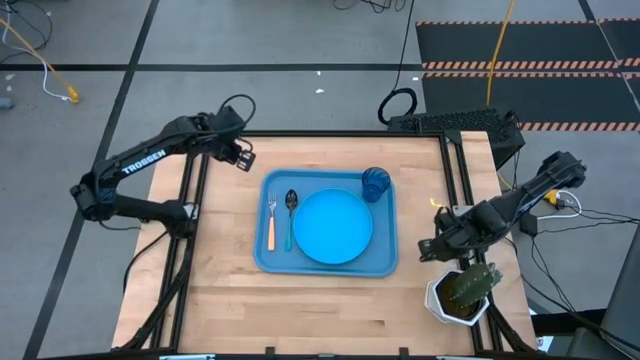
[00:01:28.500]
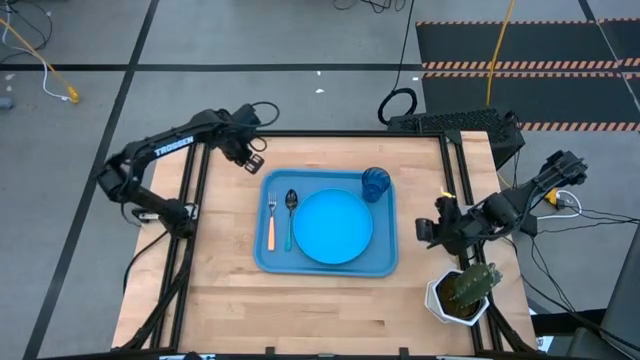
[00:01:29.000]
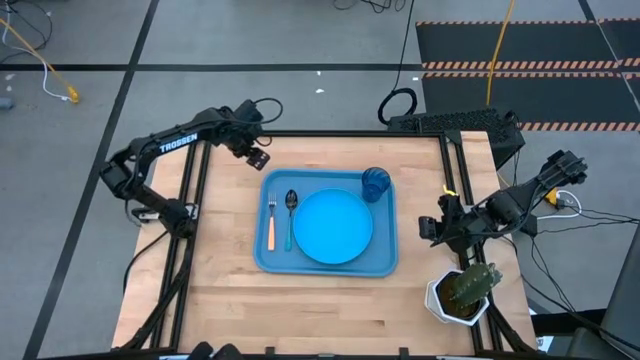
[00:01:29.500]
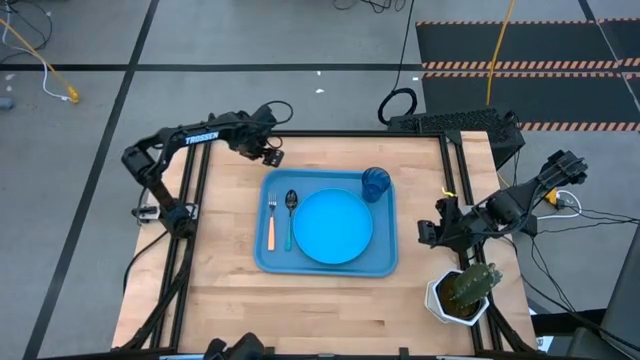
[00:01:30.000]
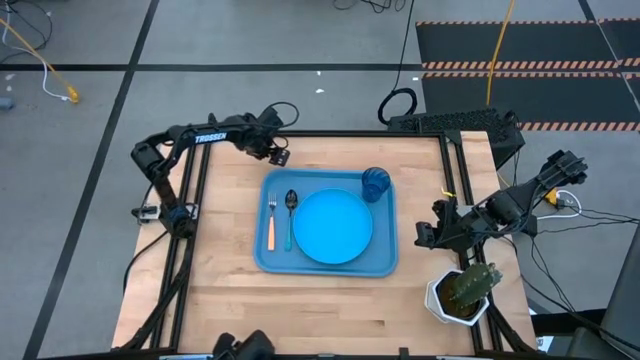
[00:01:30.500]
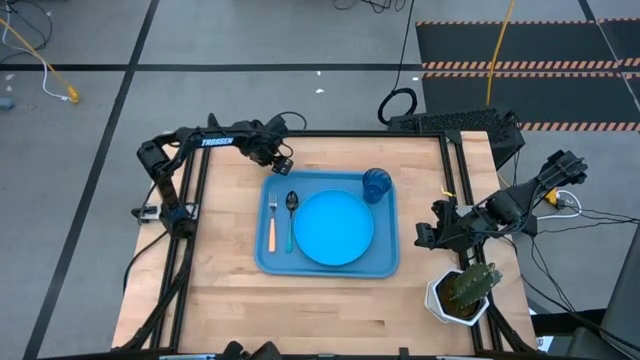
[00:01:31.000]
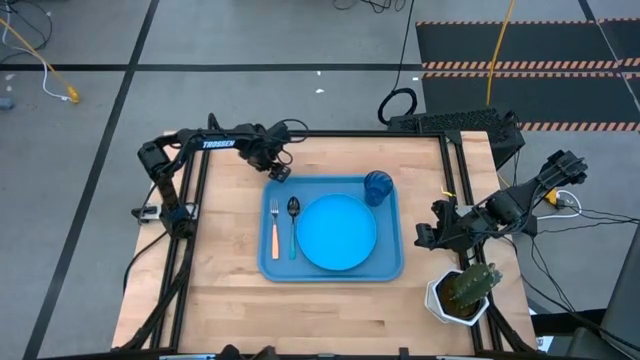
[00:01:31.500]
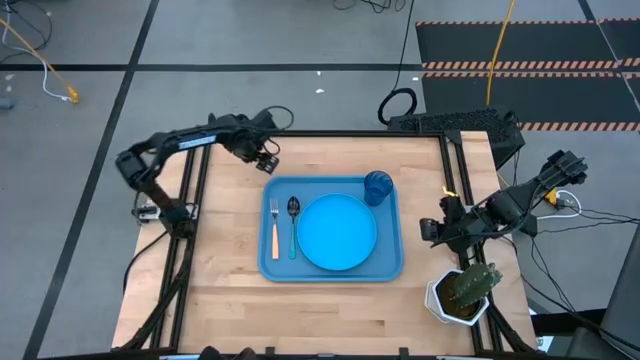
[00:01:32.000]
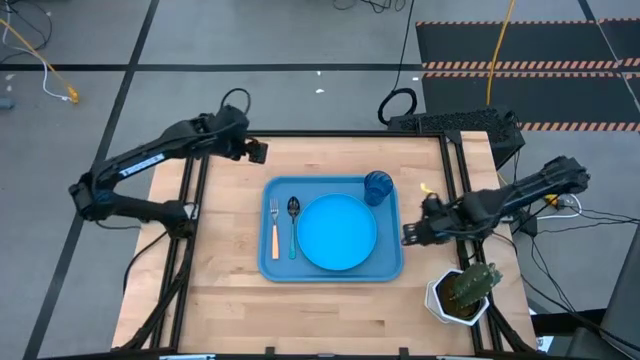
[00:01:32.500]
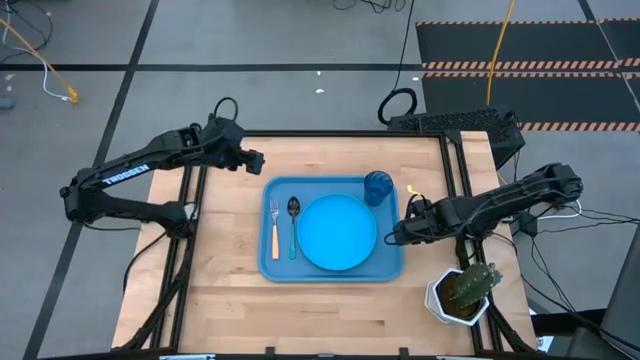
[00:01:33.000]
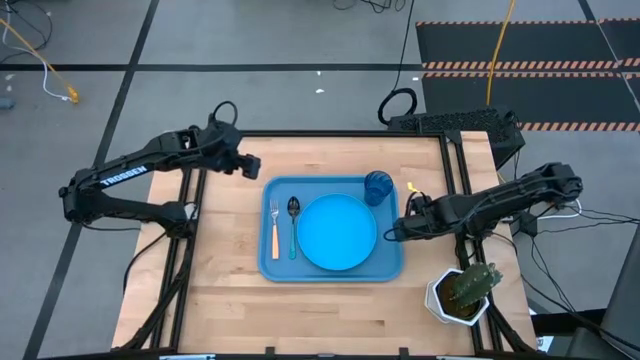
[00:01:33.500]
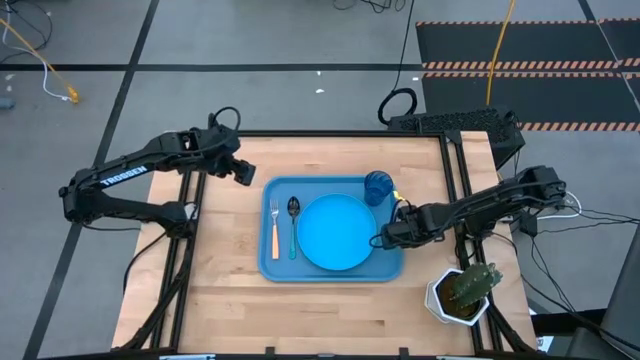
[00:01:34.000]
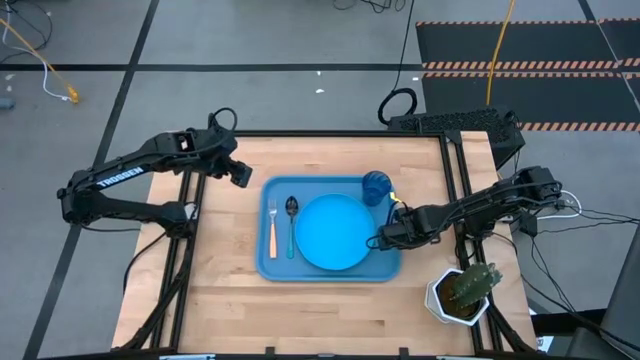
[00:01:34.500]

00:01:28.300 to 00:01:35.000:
Task: Pick and place plate/cup/fork/spoon on tray
Adjust the blue tray

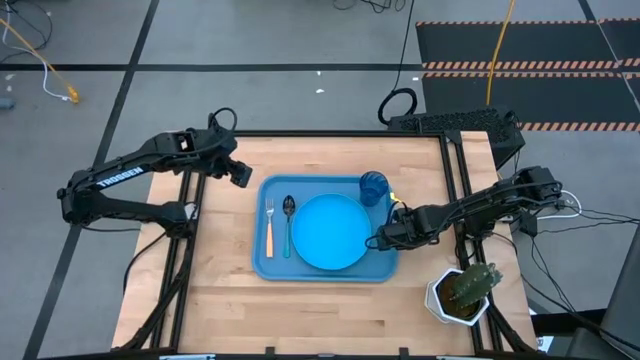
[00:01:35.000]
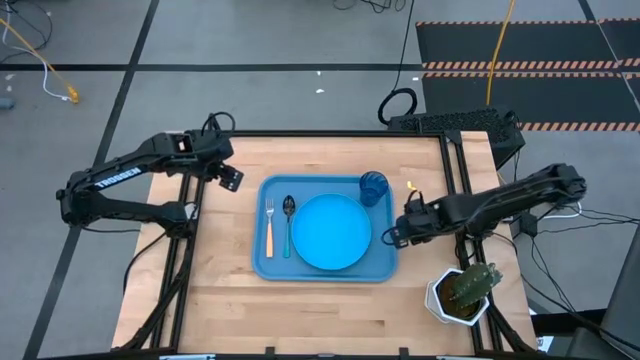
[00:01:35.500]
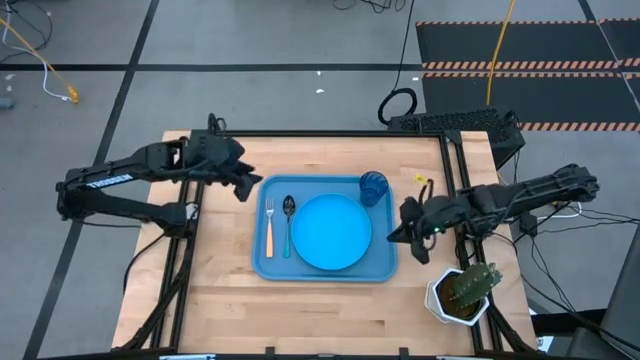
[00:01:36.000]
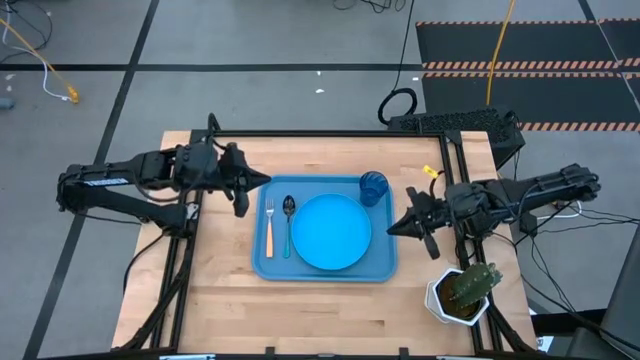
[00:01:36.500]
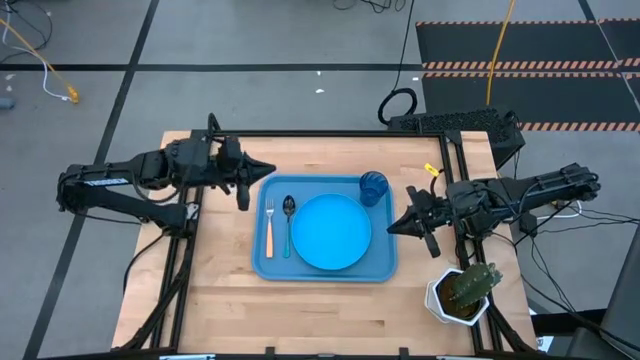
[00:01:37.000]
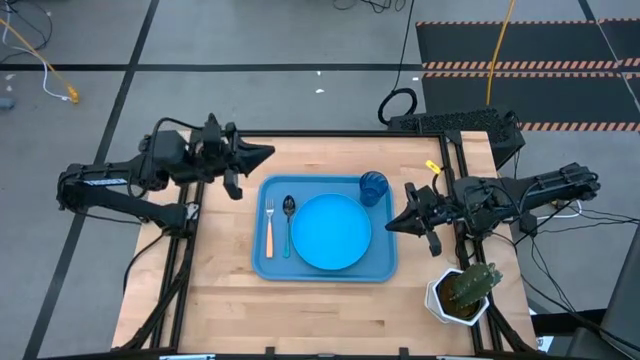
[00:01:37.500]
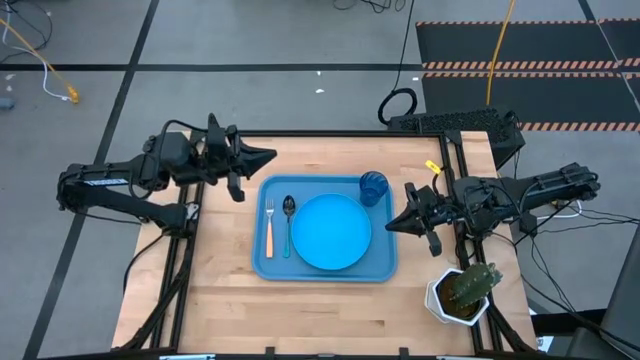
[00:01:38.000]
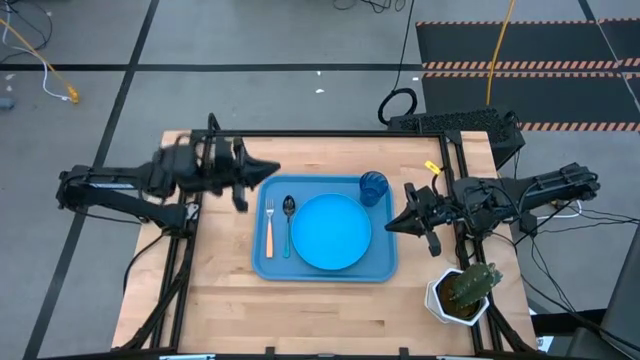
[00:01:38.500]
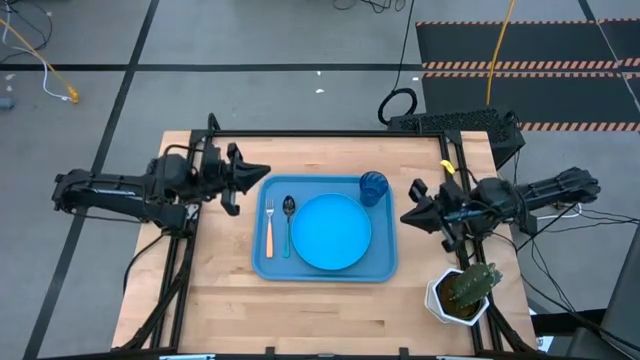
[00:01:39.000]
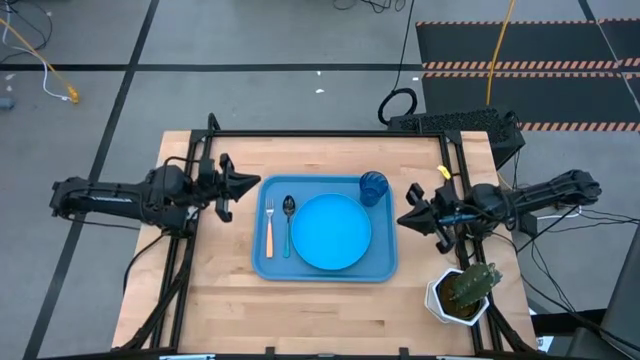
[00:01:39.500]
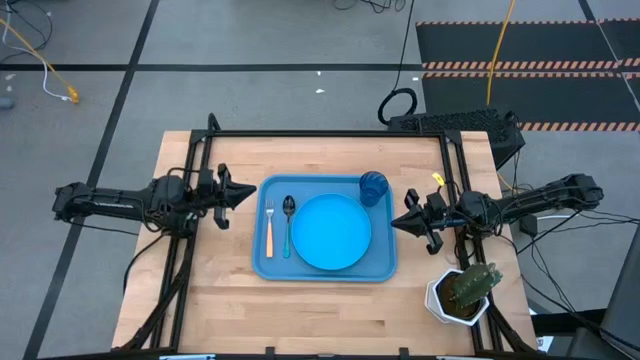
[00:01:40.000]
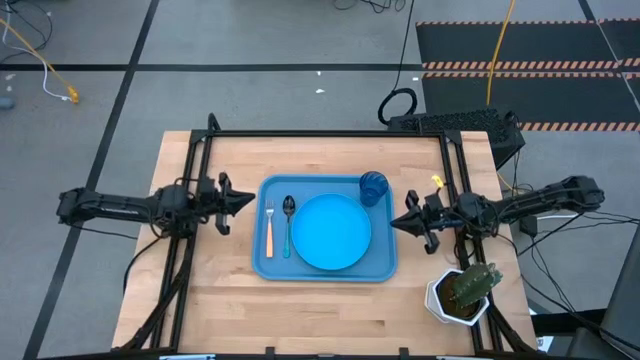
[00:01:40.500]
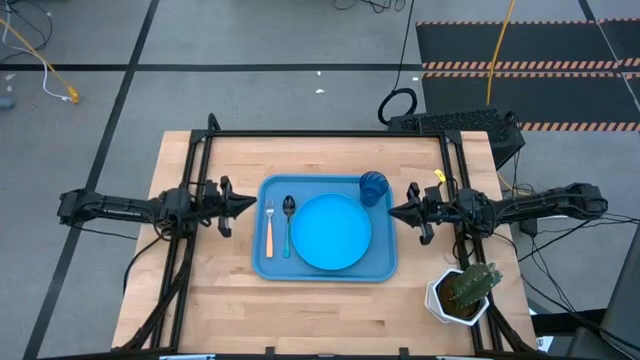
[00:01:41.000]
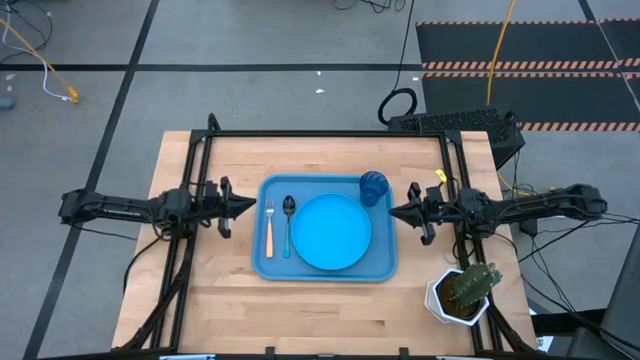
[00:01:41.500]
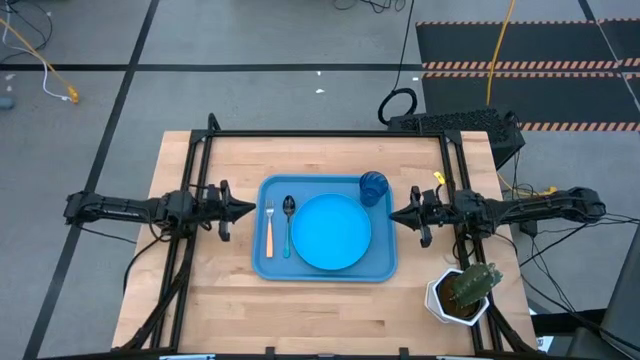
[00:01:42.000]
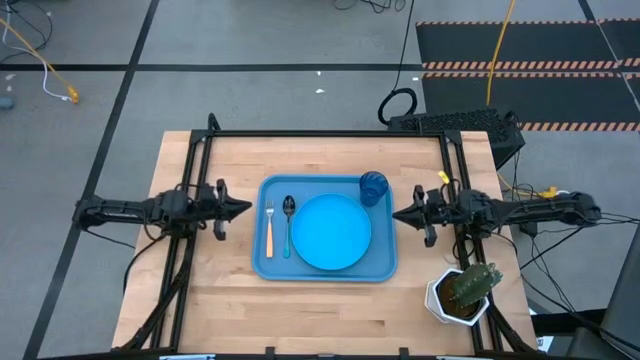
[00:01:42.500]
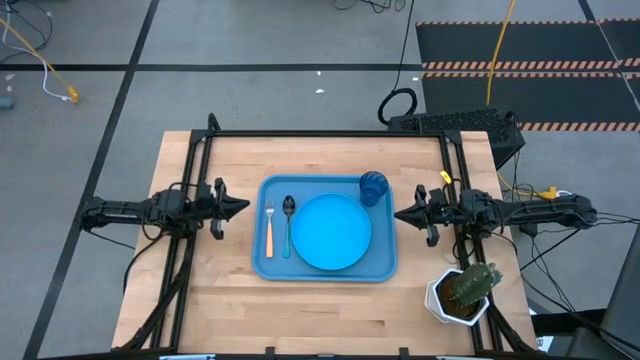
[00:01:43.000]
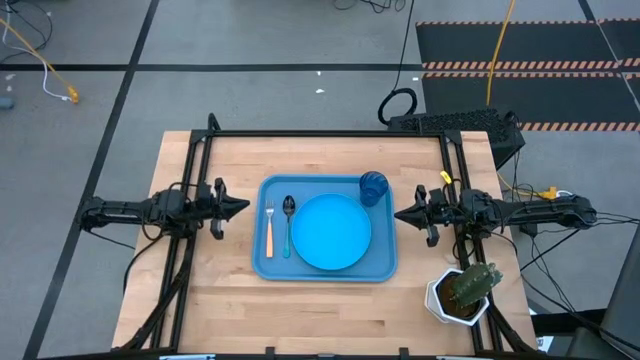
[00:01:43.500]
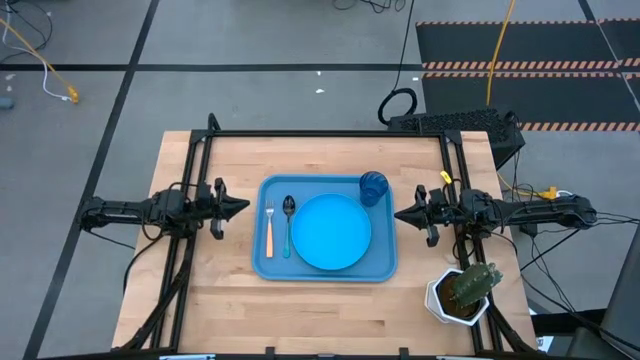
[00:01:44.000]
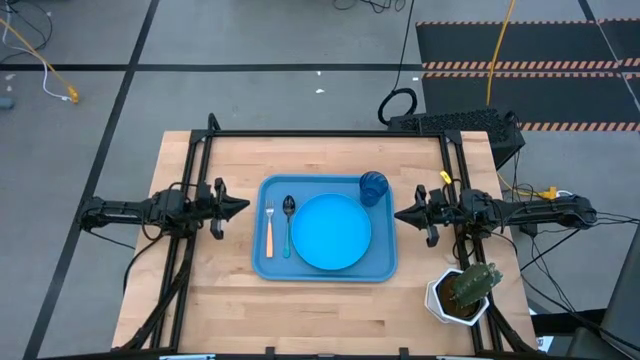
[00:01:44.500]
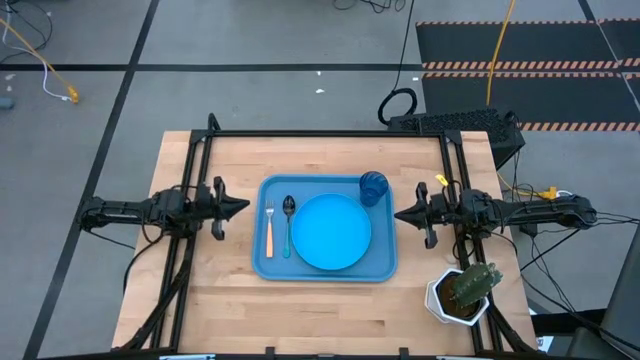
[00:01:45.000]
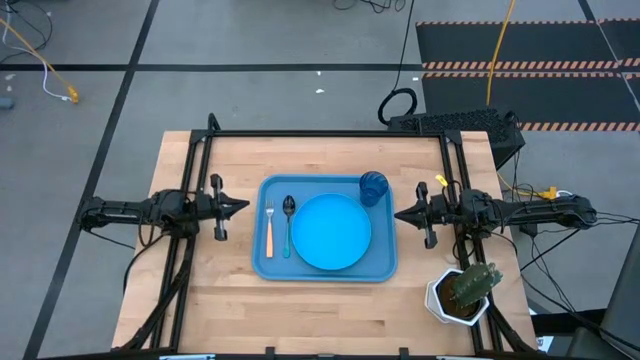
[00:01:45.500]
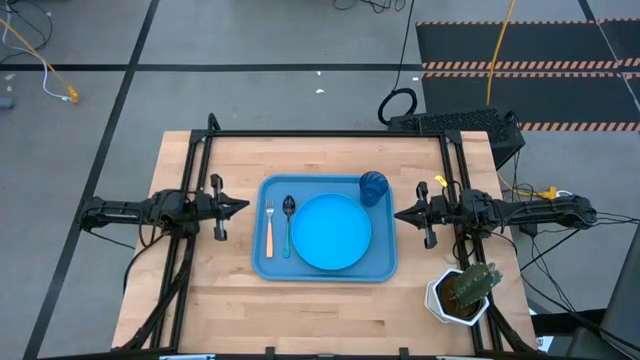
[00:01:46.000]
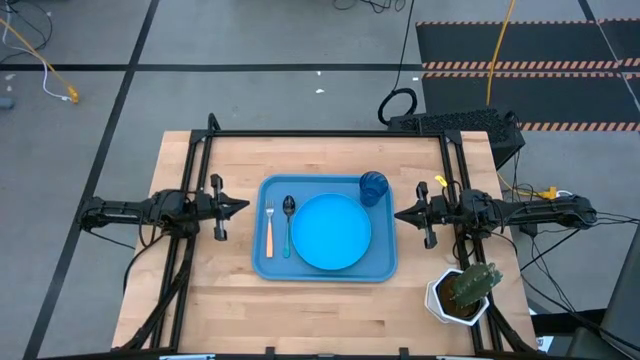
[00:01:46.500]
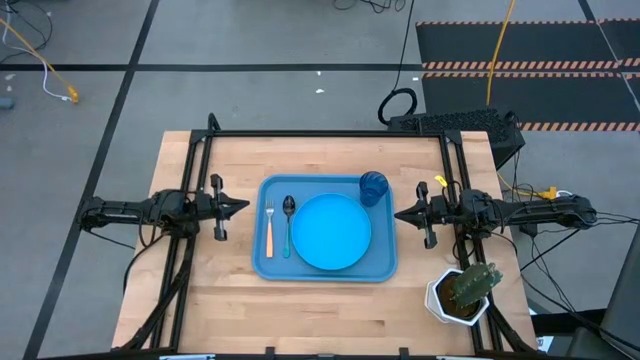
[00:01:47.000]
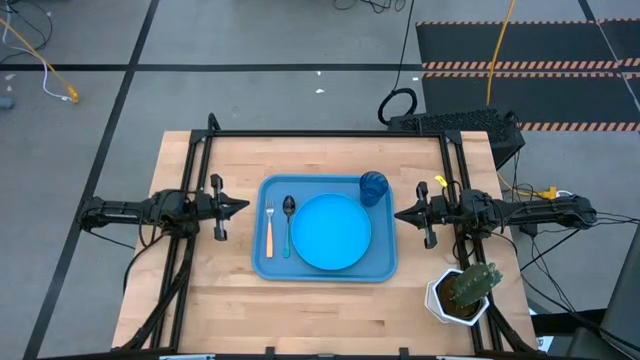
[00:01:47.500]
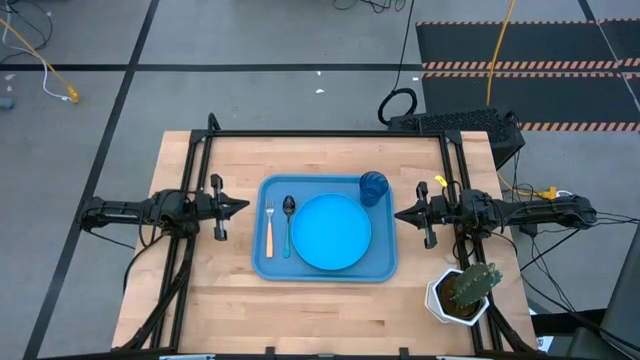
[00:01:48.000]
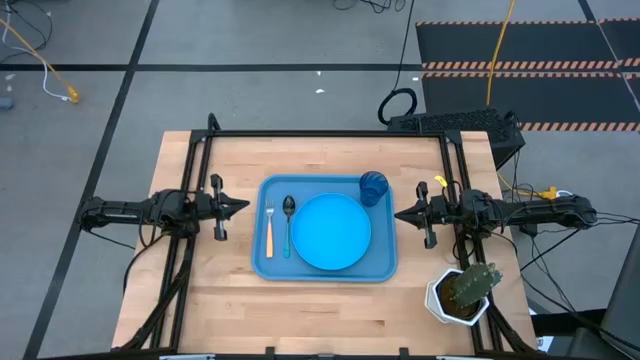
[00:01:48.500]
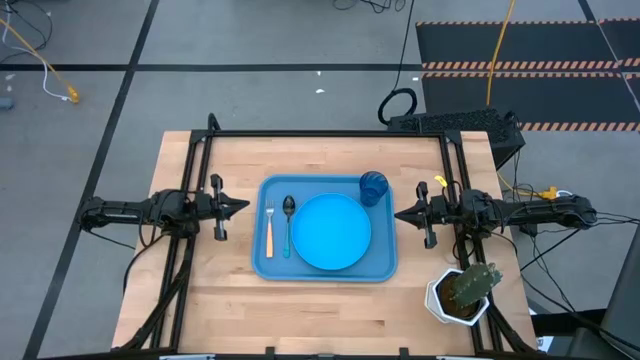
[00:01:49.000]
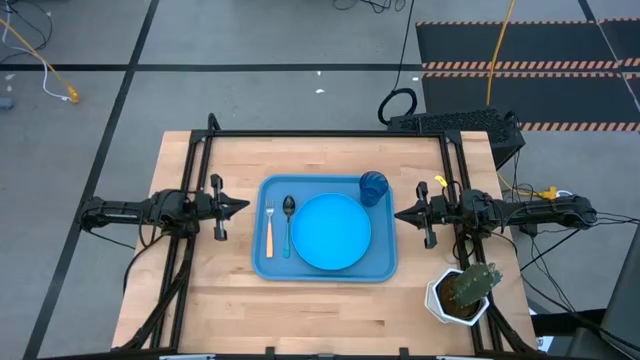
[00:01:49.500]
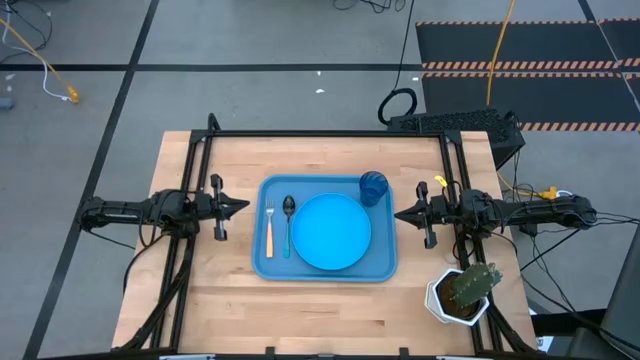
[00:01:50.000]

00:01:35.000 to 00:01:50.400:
Return to Home Position
